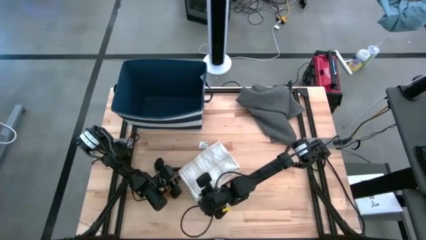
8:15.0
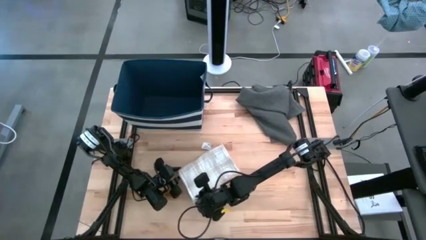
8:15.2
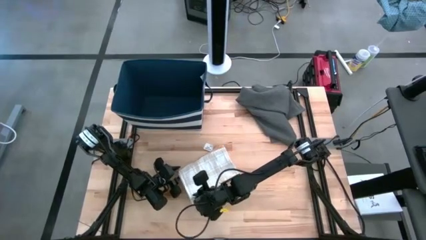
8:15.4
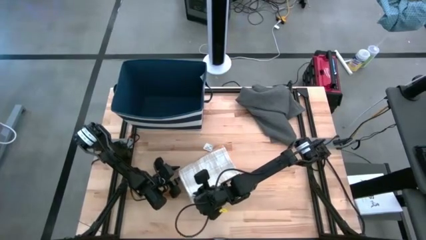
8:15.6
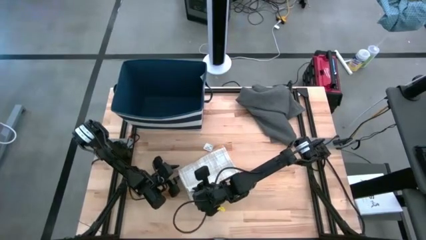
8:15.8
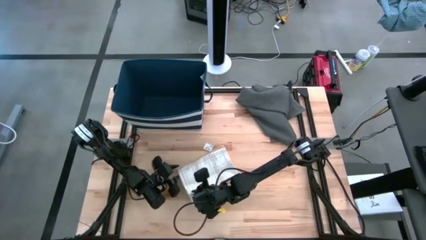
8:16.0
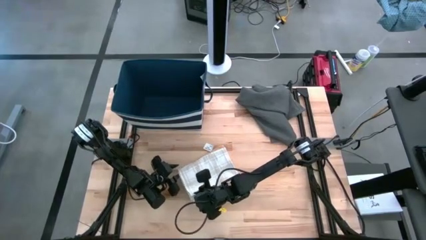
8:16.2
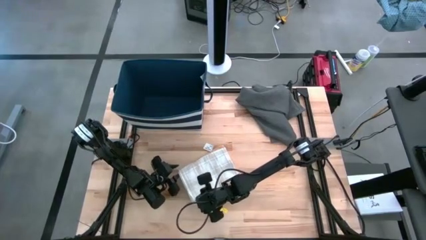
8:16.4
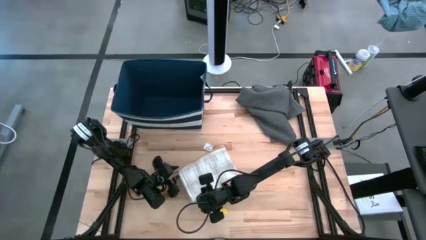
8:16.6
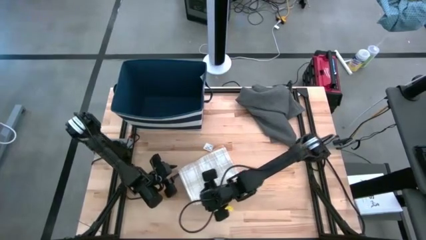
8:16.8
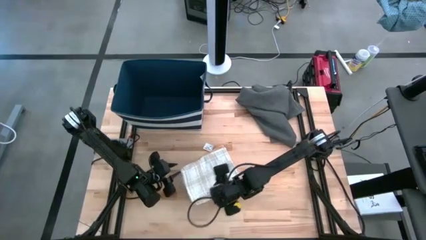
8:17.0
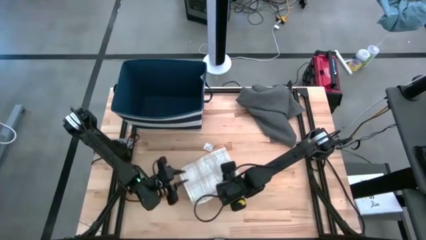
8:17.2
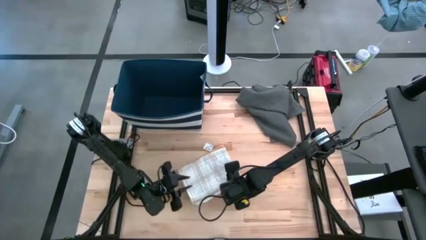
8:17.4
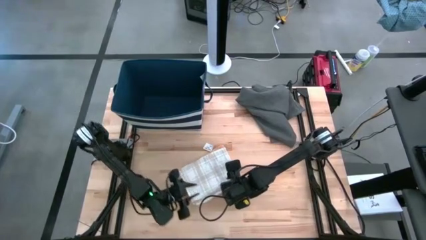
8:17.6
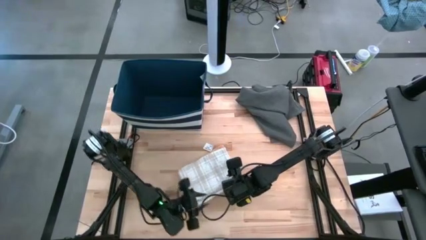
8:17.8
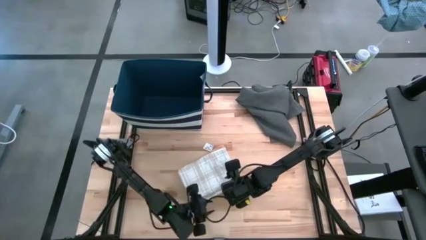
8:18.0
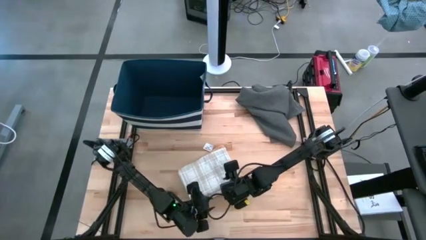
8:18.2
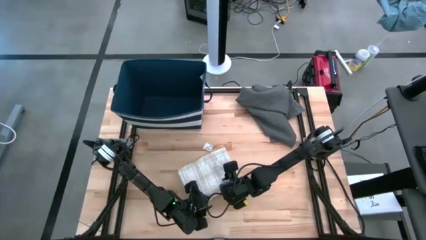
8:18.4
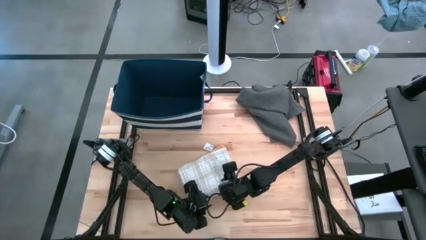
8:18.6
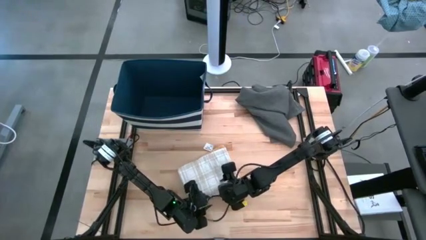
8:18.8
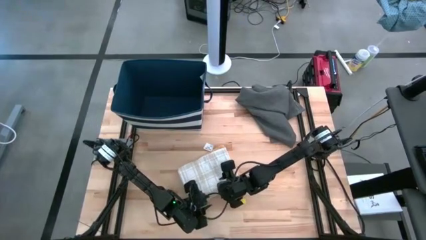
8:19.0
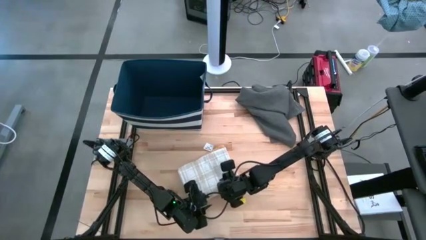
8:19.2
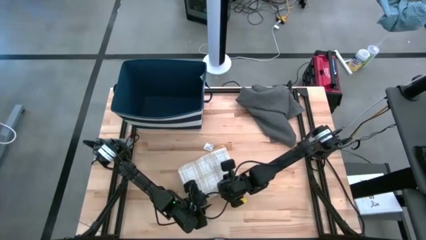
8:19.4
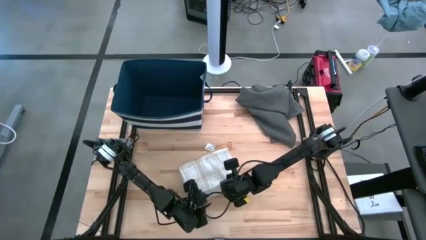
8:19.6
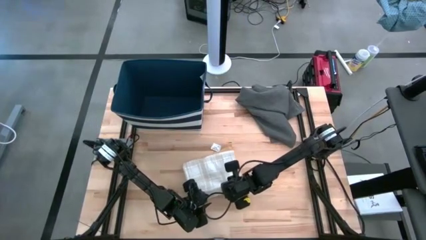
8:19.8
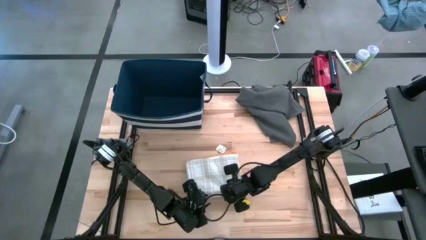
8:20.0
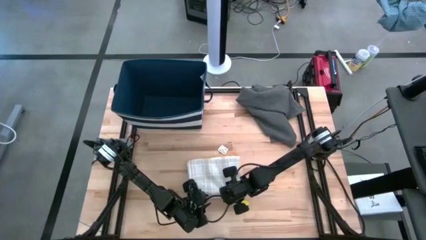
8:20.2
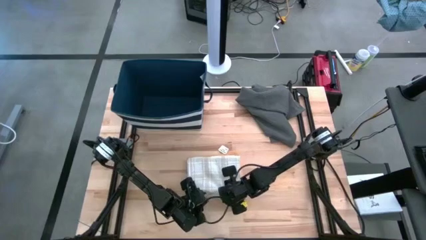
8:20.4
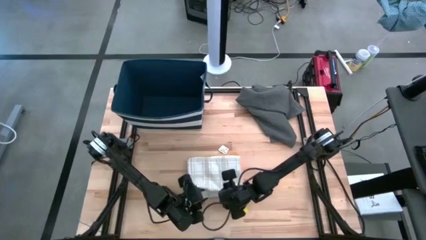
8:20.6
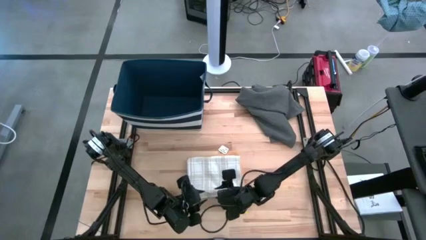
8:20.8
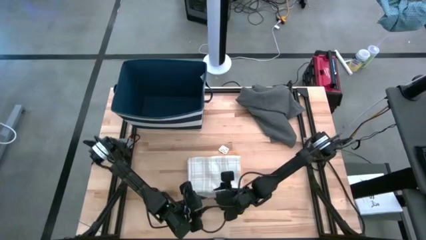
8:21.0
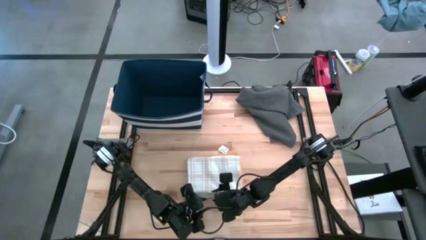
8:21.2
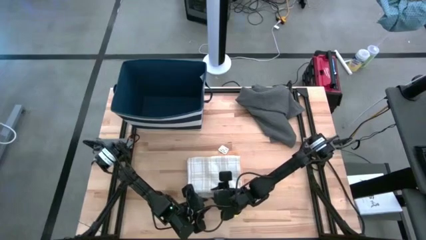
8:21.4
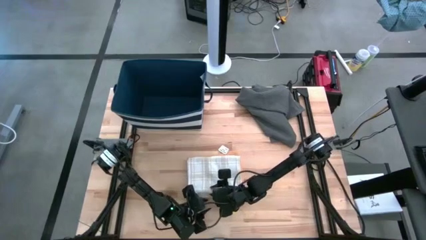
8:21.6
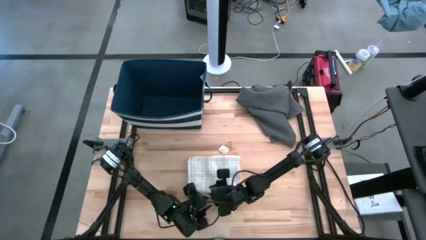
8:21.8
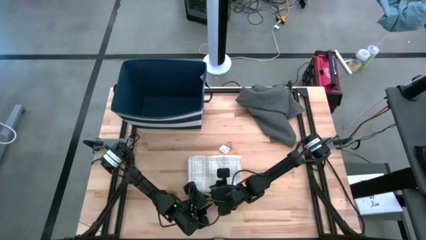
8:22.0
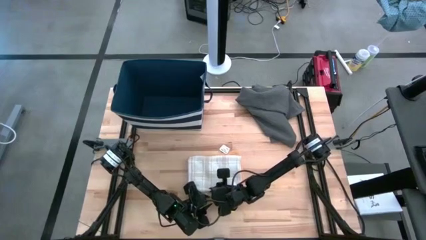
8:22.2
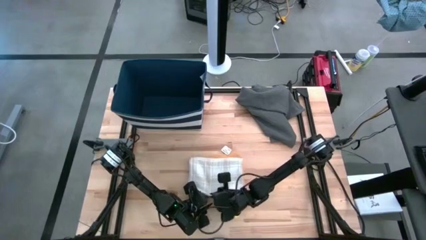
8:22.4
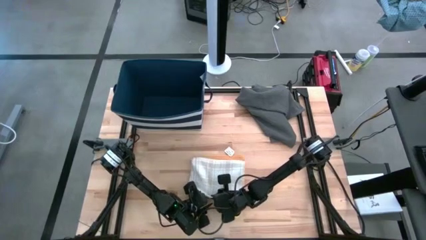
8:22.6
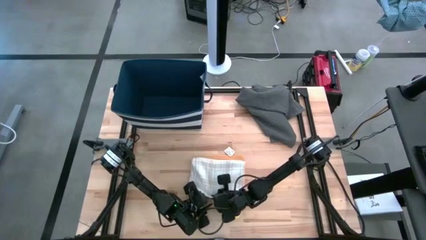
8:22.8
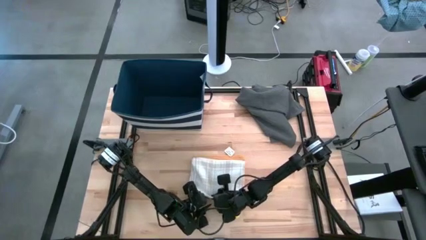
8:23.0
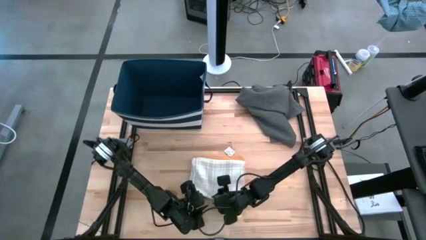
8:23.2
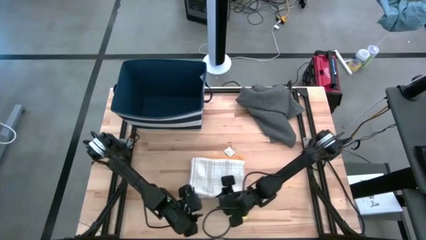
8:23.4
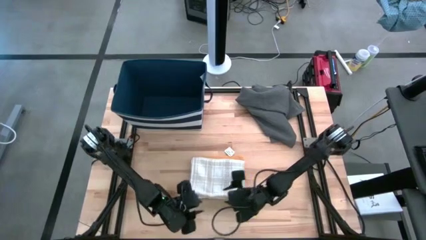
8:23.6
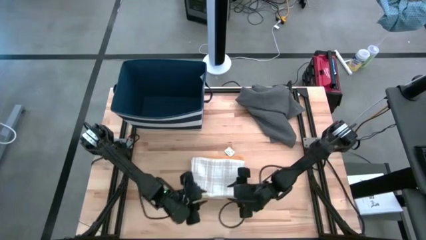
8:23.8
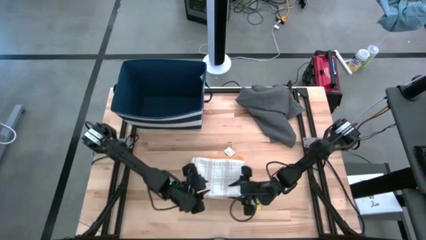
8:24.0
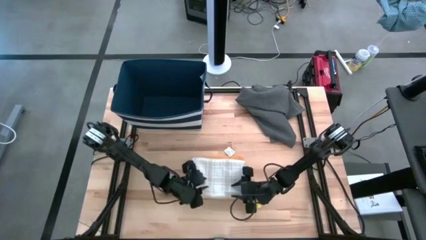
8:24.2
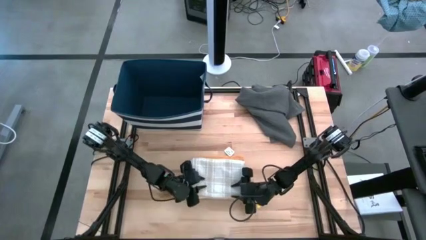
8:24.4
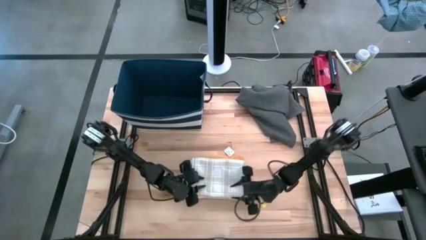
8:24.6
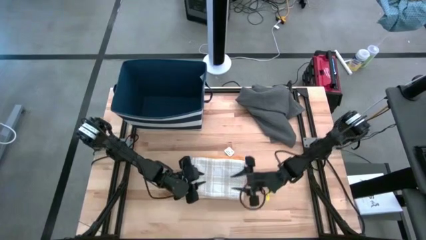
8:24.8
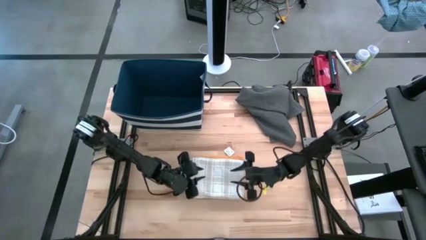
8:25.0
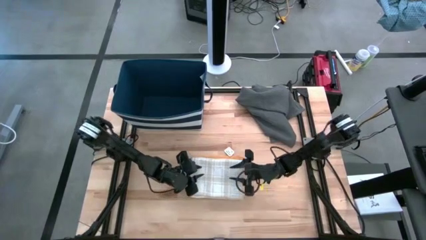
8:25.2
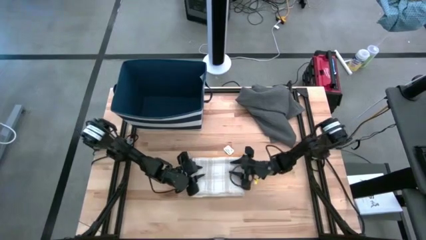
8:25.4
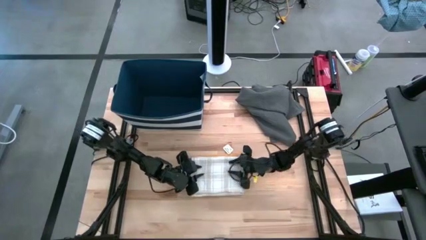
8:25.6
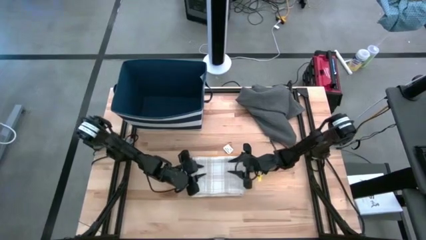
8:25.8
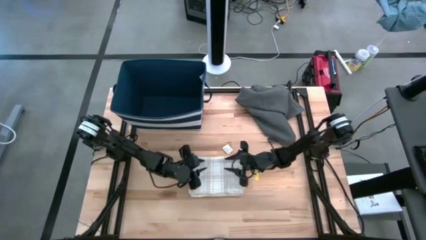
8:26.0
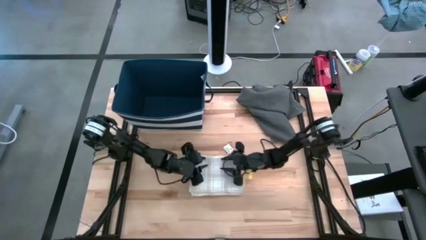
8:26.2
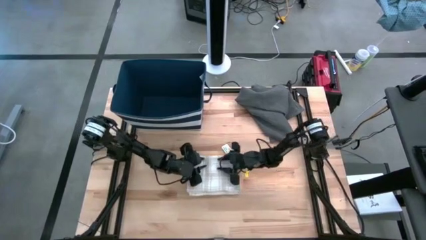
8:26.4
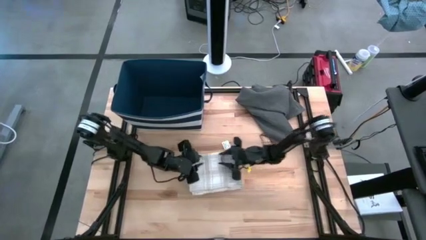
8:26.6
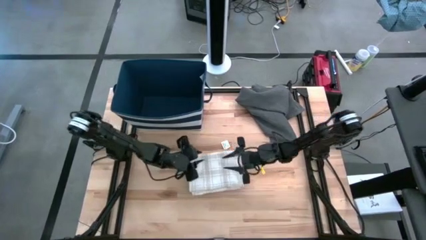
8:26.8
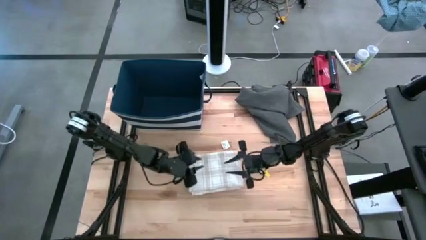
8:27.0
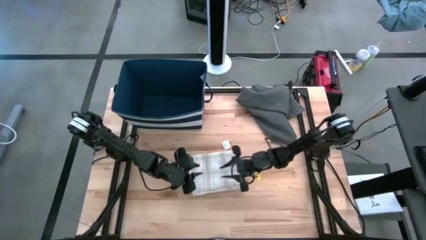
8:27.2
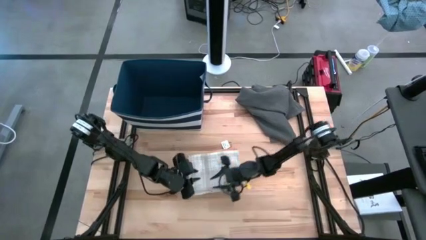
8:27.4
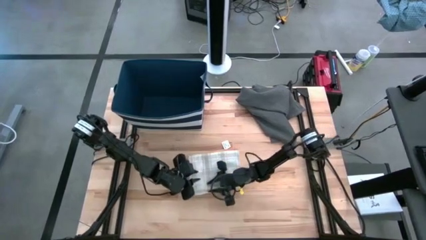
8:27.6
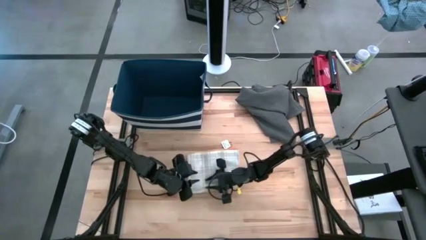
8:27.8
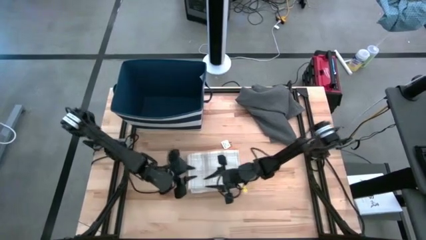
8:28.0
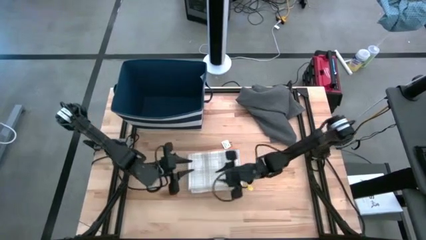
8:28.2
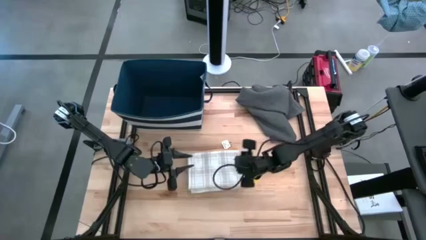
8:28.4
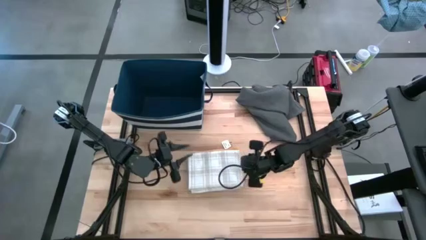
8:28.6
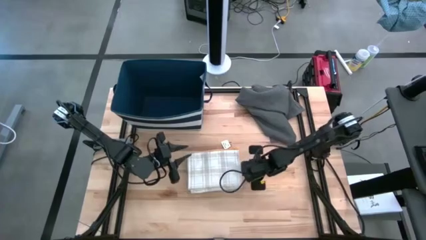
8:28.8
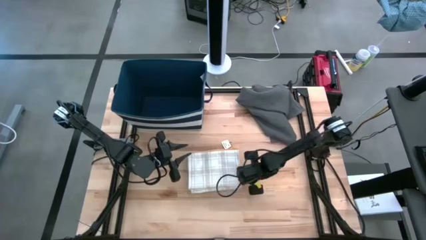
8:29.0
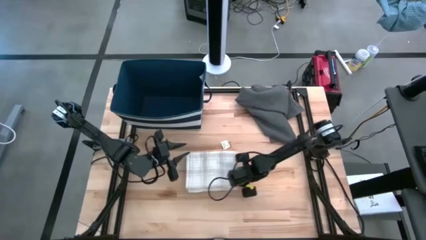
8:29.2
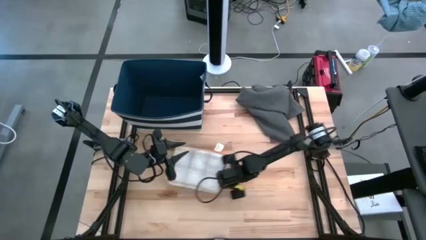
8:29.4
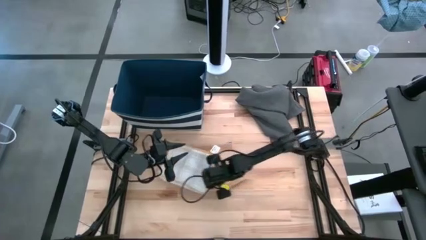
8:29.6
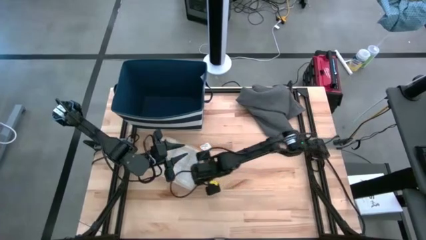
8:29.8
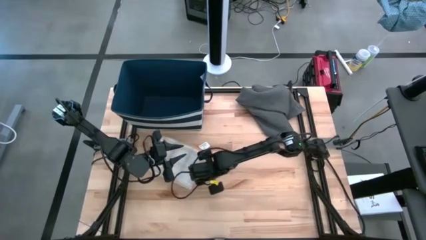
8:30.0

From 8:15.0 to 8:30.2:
Task: Fold towel
Stack the white patterned kitchen towel on top of the orange towel

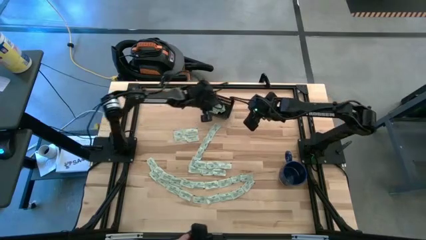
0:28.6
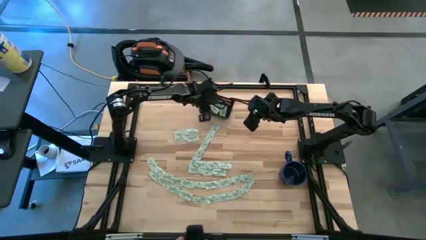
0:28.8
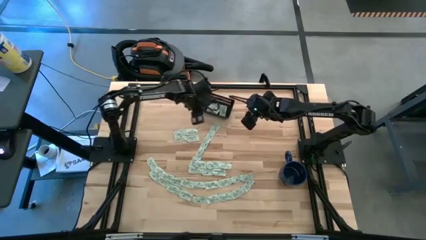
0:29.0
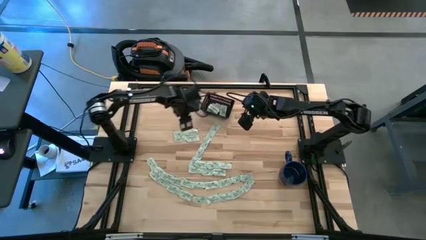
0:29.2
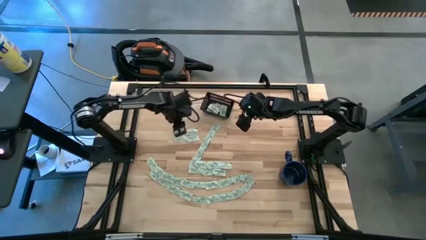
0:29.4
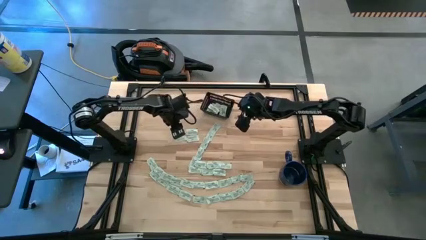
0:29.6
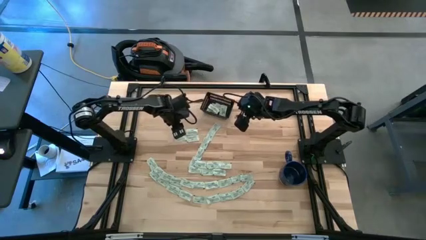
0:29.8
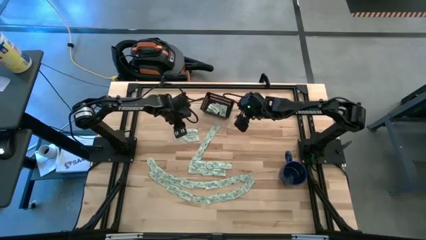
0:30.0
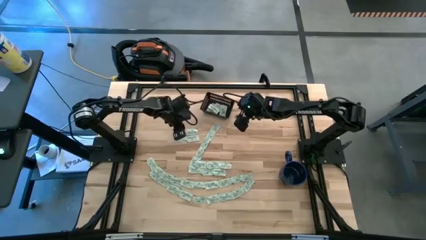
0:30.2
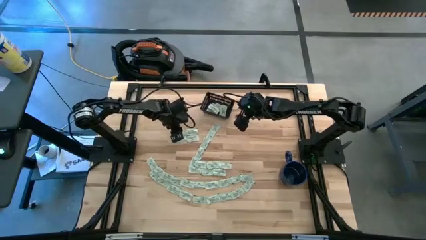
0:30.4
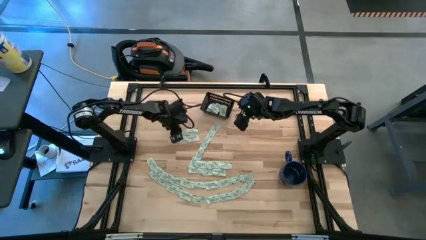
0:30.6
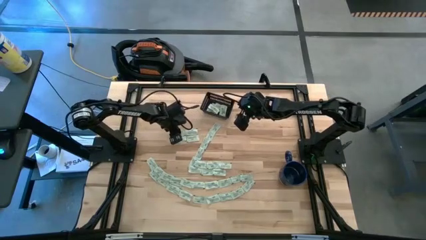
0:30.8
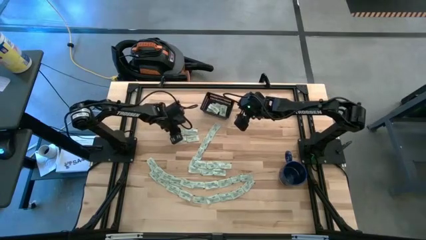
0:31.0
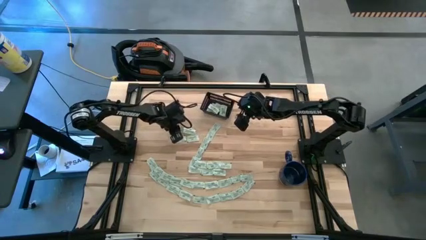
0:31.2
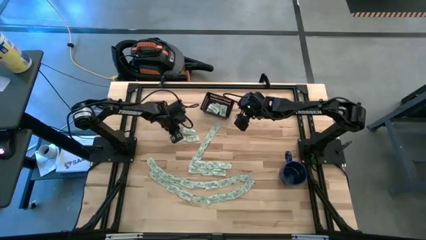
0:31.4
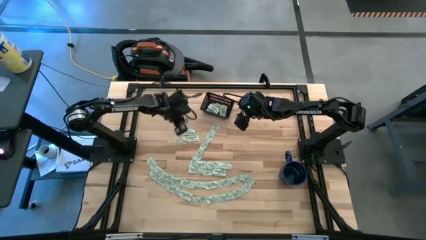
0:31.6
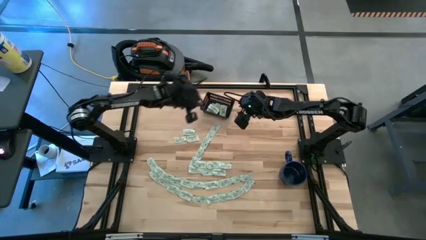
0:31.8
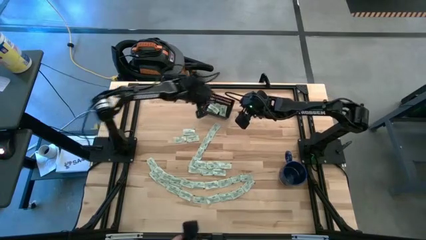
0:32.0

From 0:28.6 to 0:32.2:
Task: Pick and place Stevia / Truvia into bins
Put the stevia packet into the black bin
